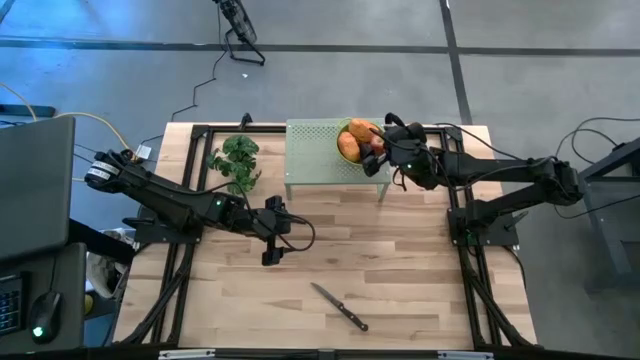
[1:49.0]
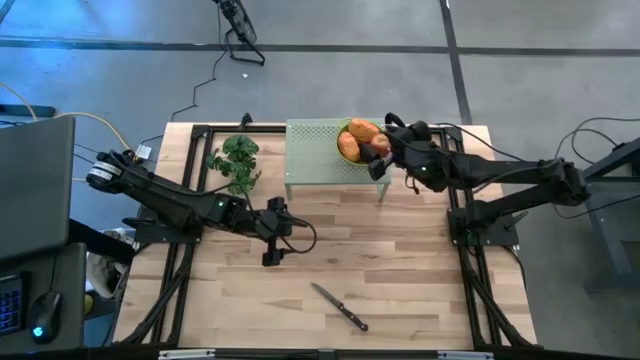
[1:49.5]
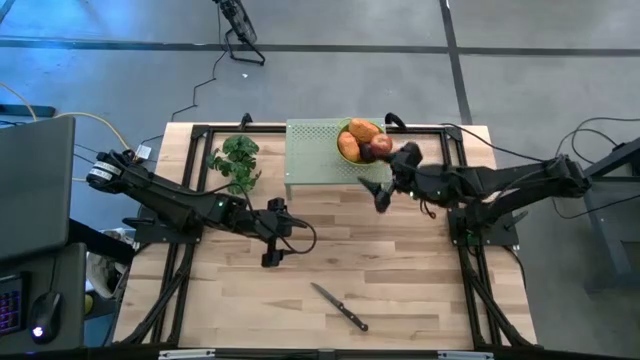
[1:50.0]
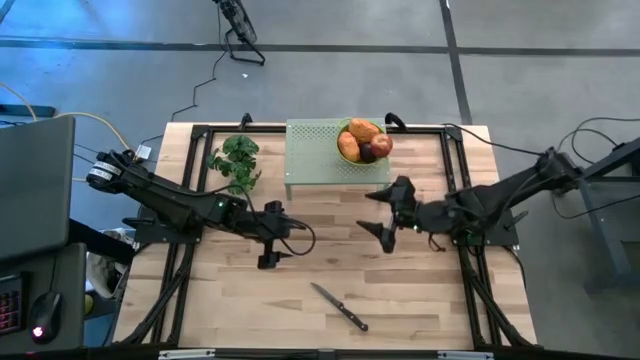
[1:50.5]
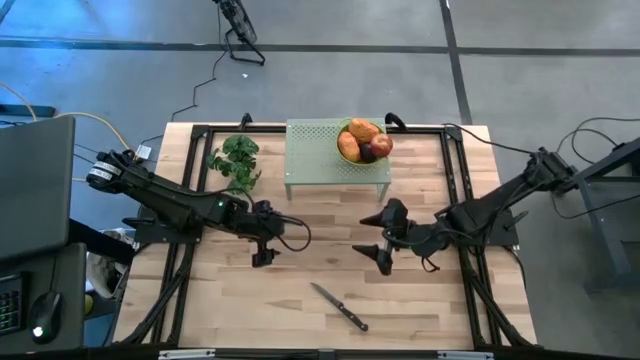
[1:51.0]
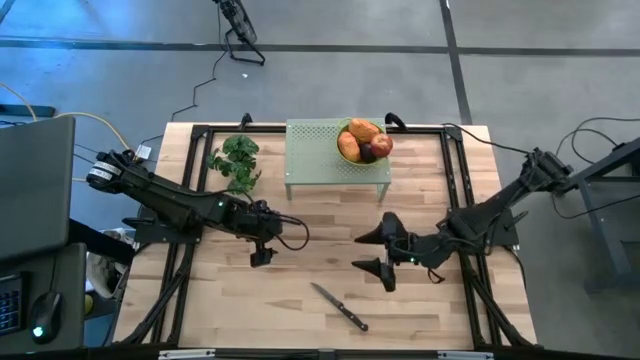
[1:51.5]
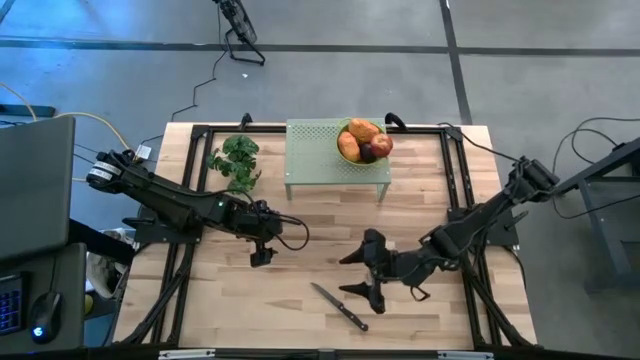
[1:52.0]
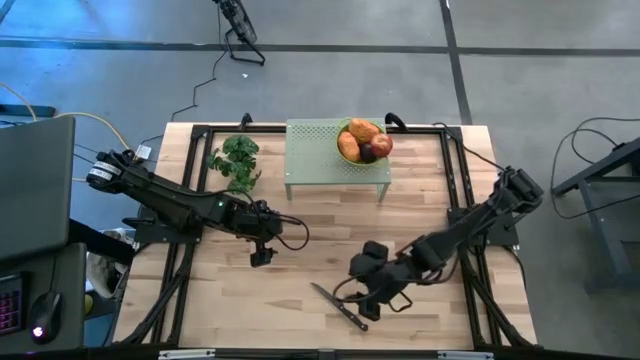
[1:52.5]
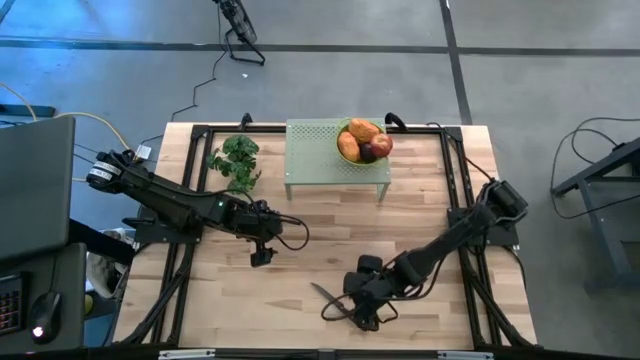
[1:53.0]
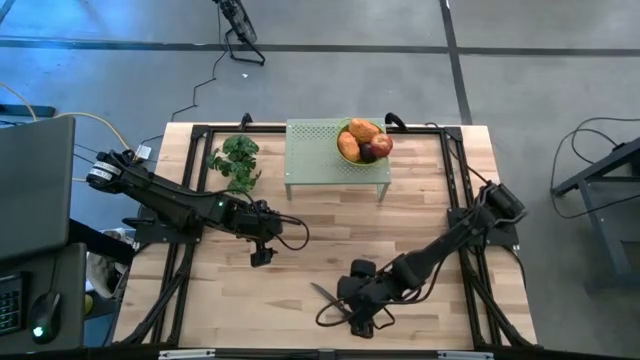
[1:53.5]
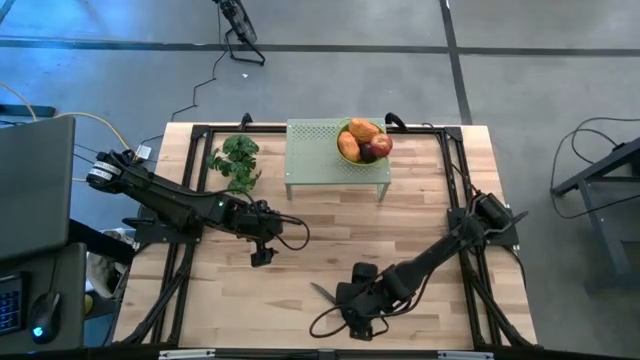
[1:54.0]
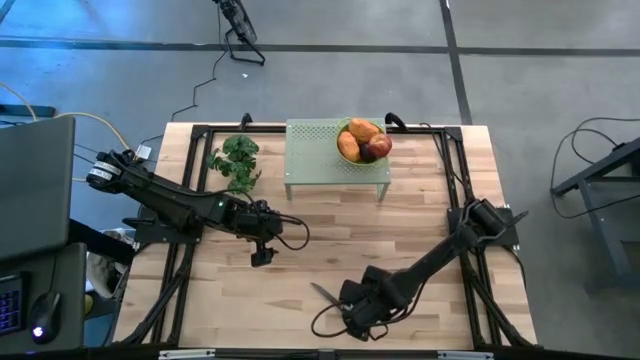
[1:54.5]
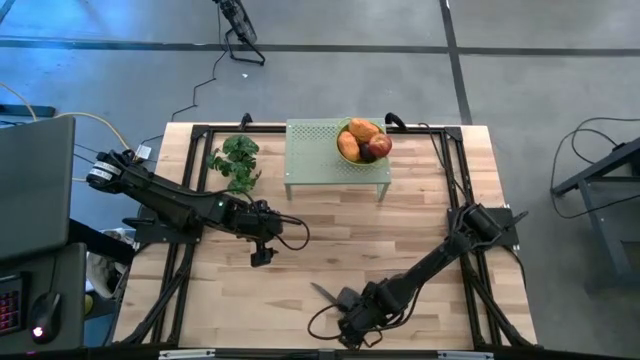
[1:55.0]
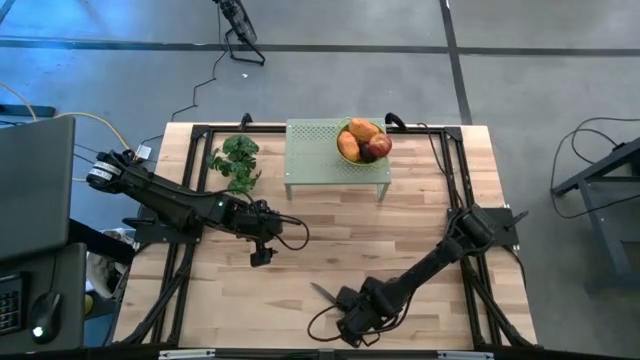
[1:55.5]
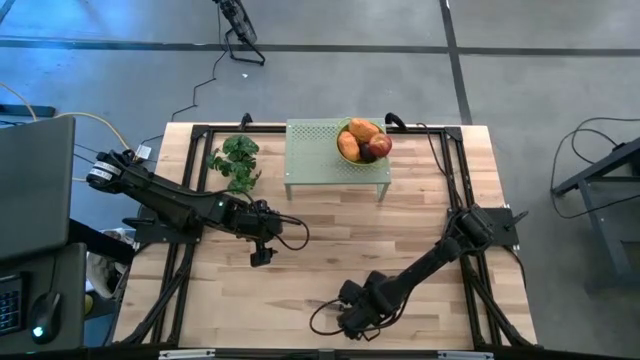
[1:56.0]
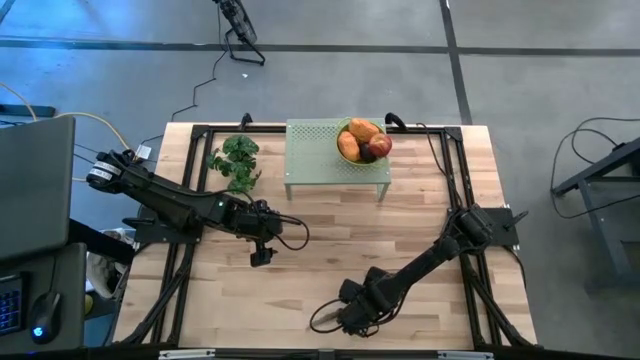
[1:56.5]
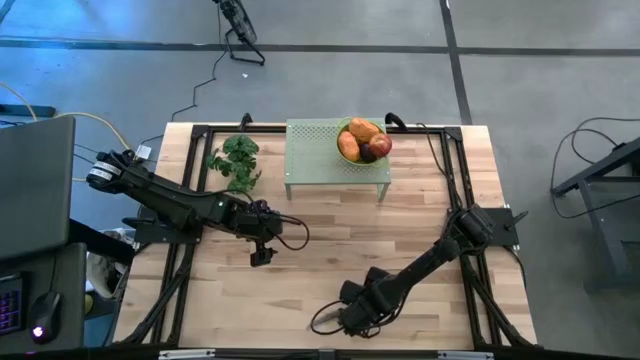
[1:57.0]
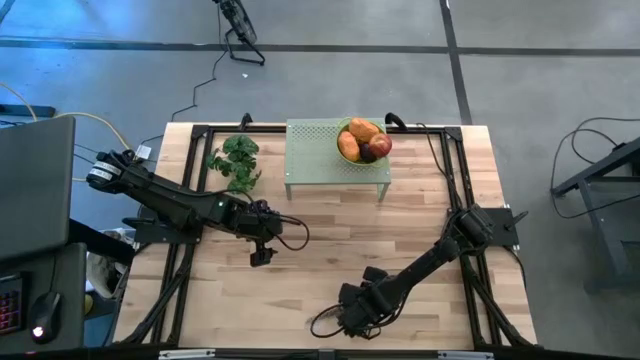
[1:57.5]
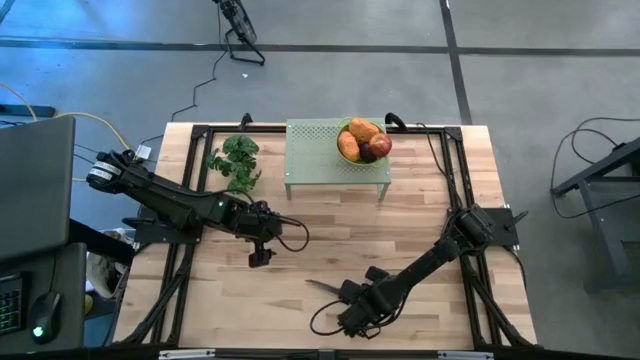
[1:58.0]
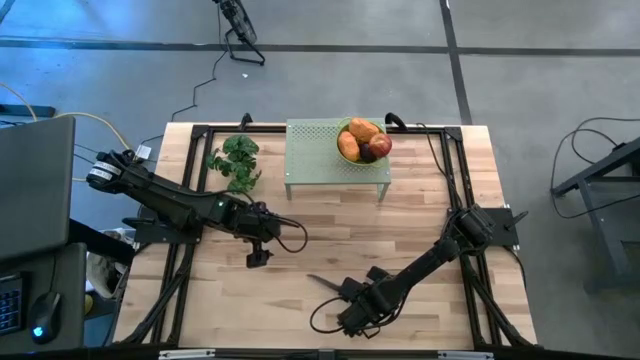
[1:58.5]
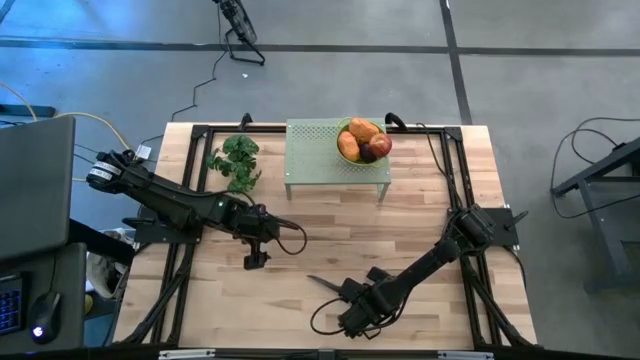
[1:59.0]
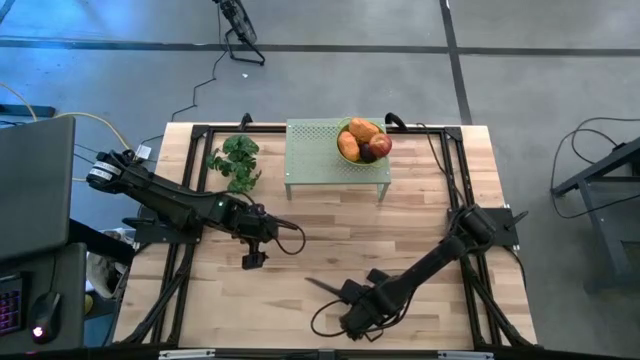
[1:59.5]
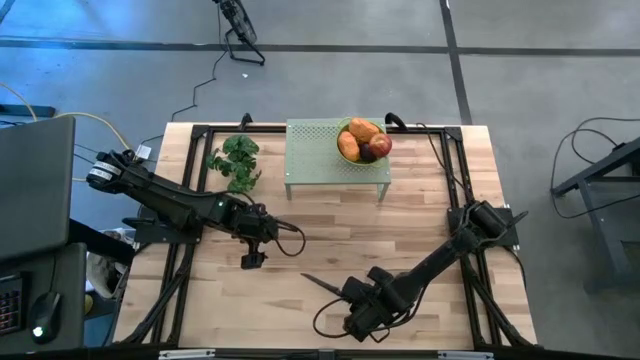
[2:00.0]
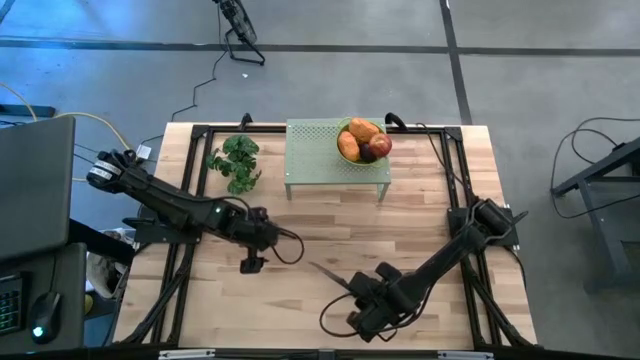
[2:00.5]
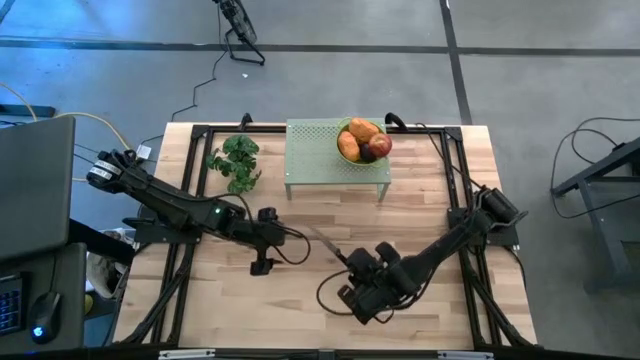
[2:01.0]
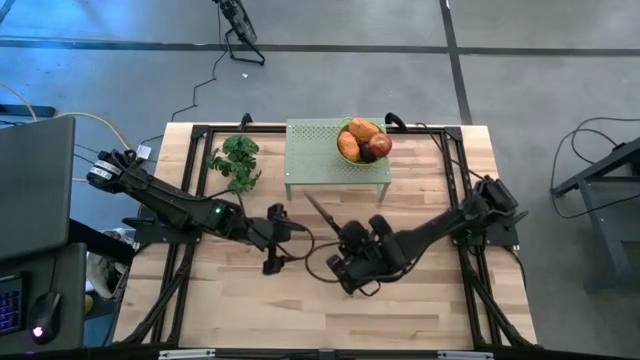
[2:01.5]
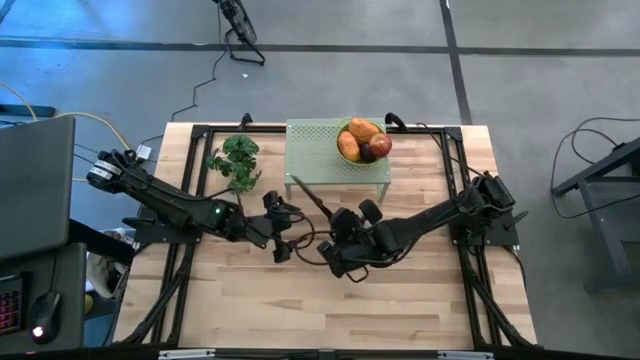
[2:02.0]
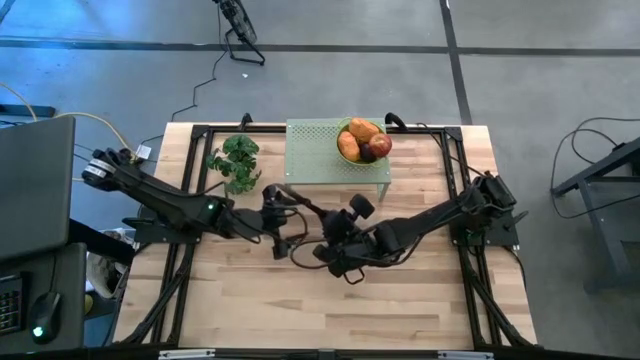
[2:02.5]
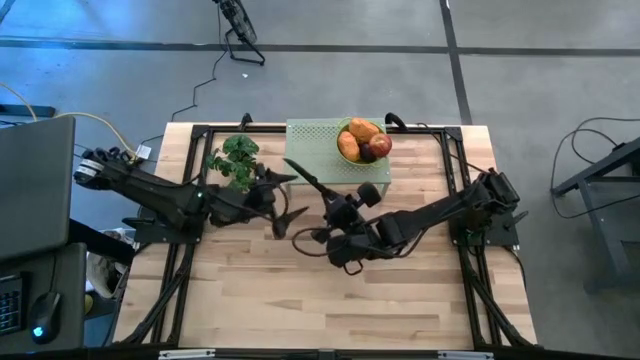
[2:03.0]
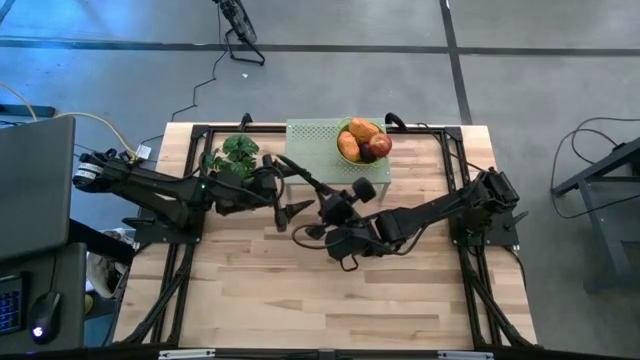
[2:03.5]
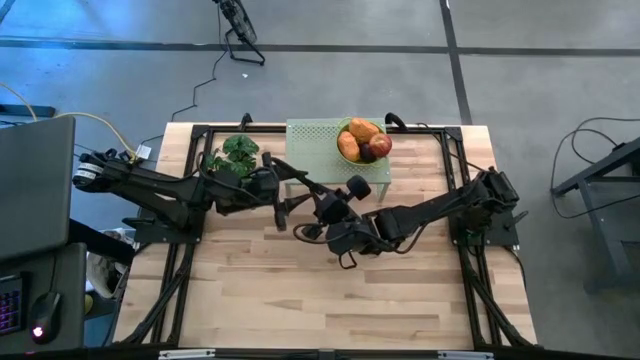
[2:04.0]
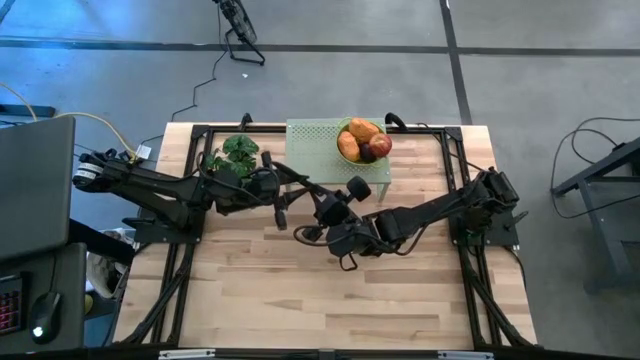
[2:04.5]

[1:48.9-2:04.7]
Task: Pick & Place Fruit
Put the knife on the top shelf to the left of the green strainer bowl

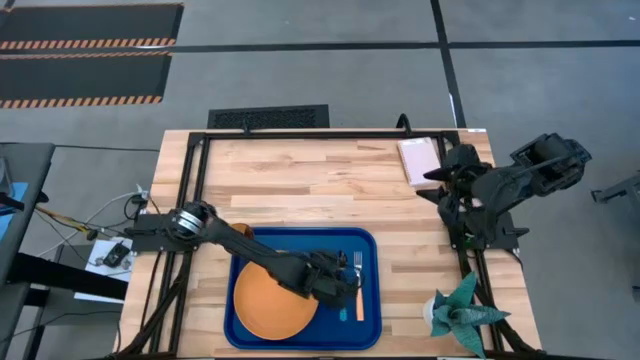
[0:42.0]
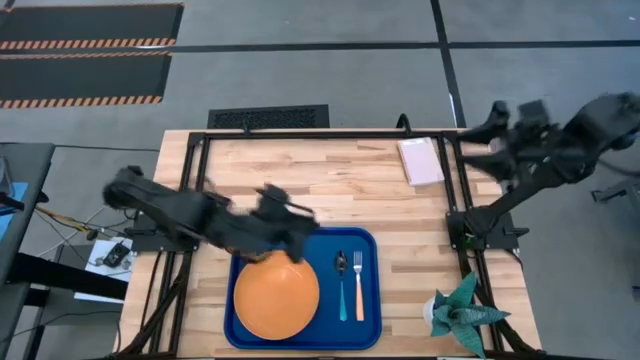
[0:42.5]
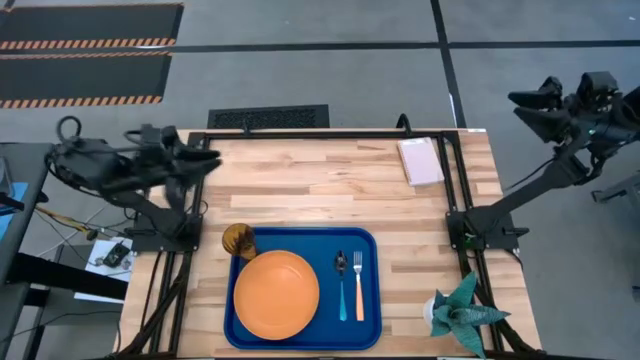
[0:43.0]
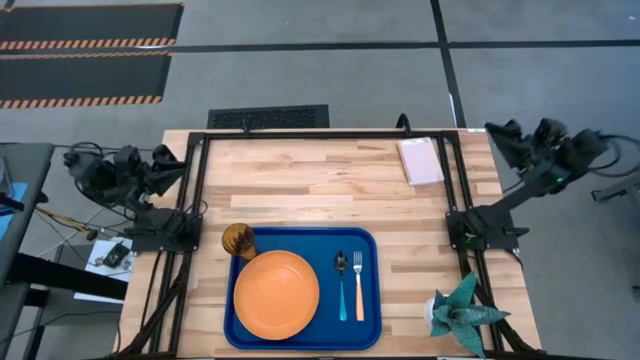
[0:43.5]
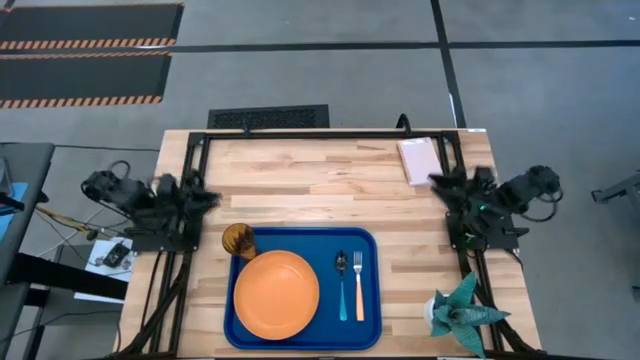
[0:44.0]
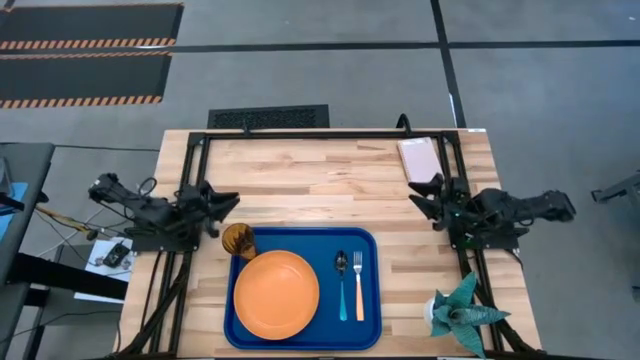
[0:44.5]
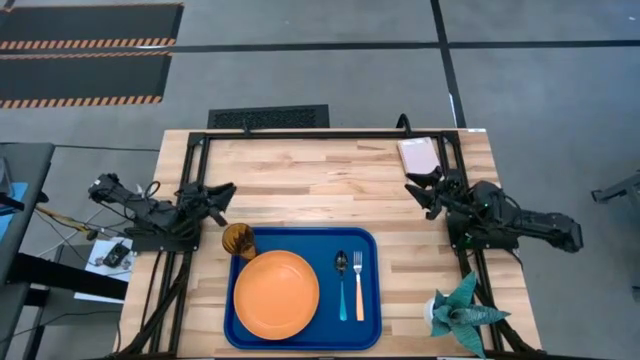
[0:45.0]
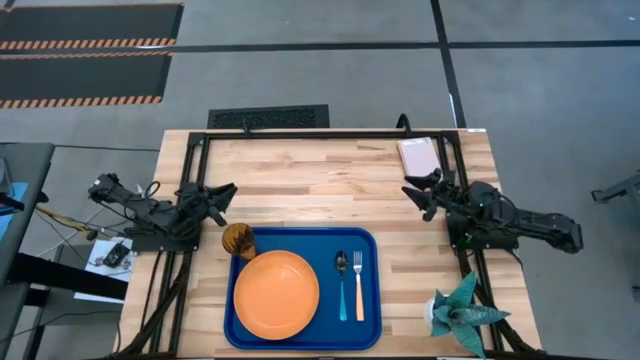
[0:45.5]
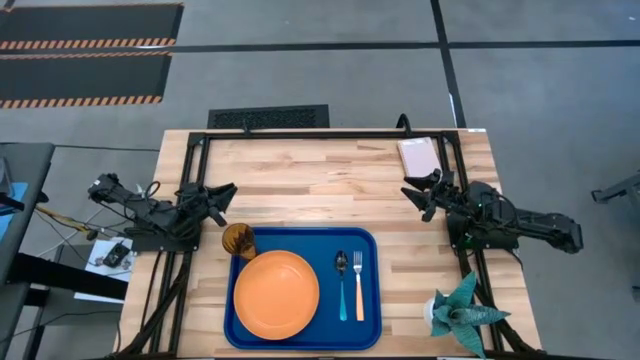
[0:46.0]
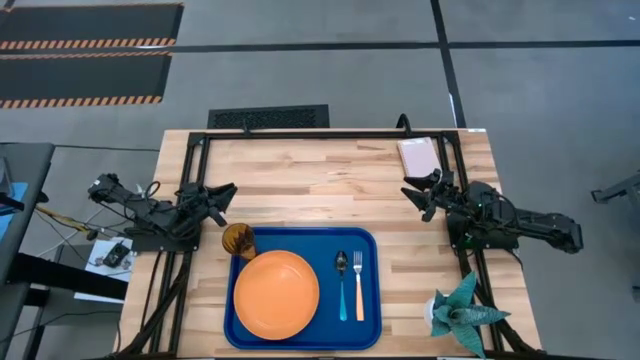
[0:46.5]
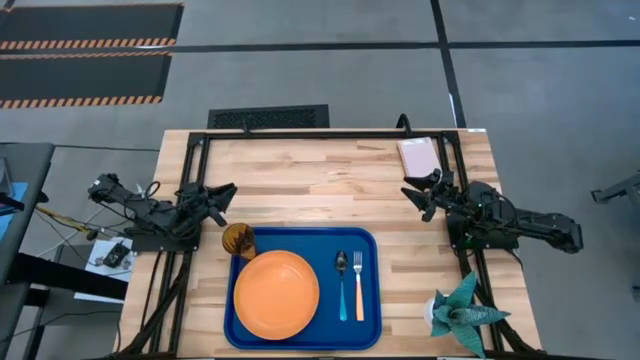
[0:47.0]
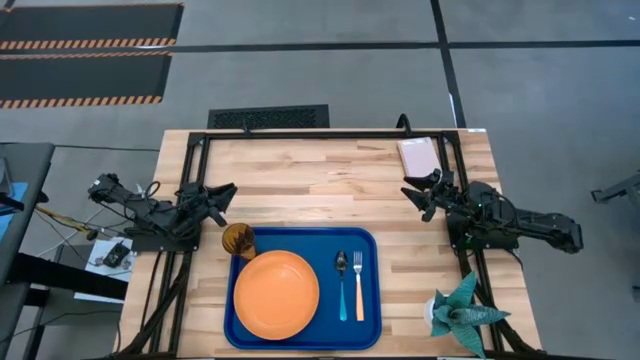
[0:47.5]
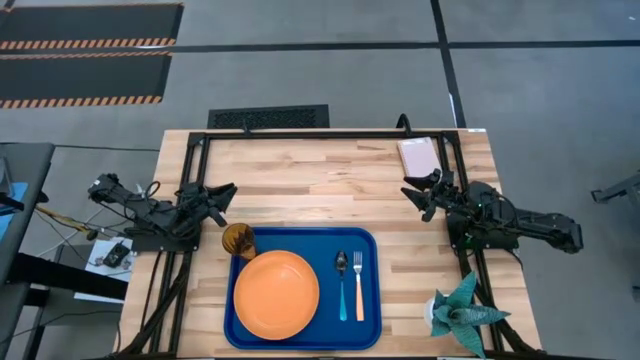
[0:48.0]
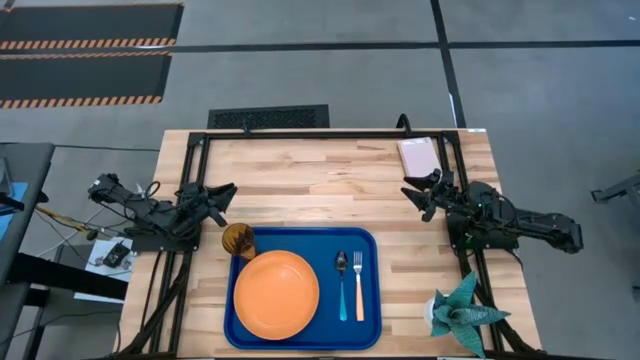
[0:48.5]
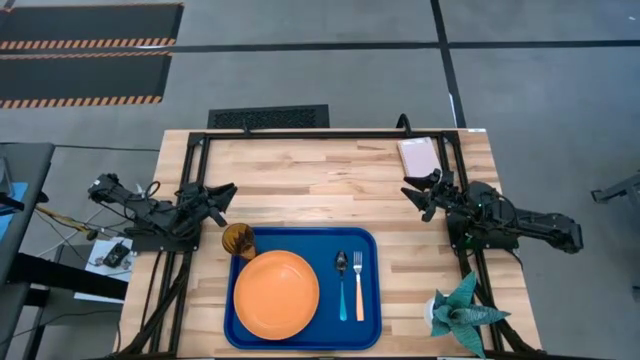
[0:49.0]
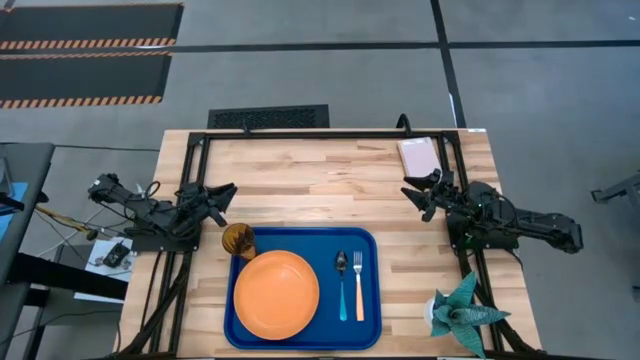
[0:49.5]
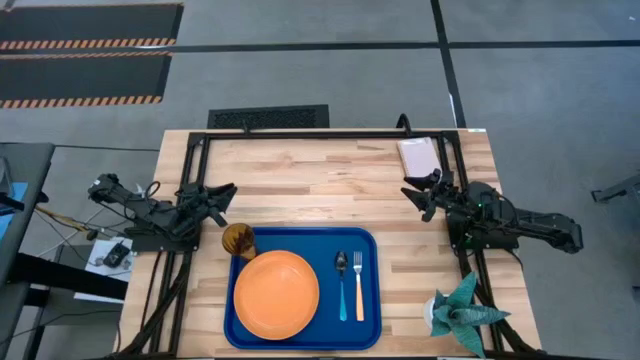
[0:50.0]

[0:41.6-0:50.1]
Task: Pick and place plate/cup/fork/spoon on tray
Return to Home Position
